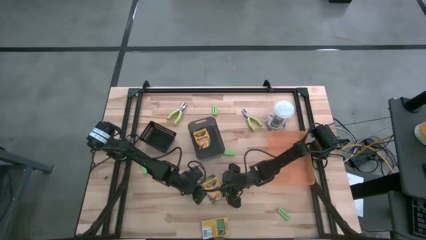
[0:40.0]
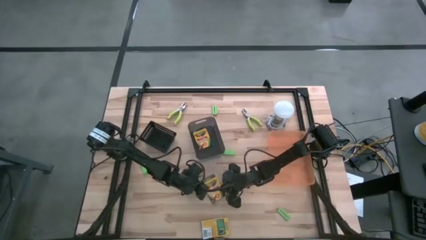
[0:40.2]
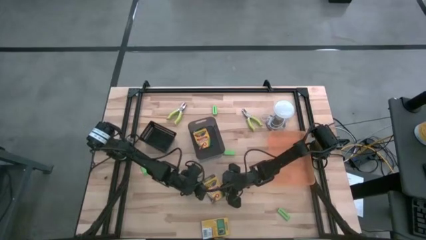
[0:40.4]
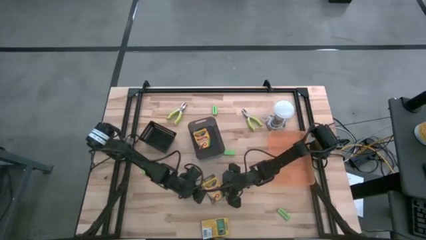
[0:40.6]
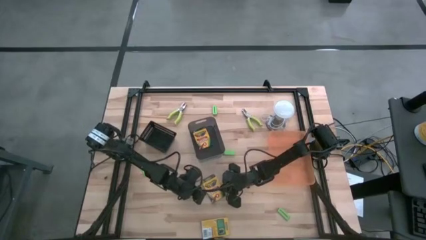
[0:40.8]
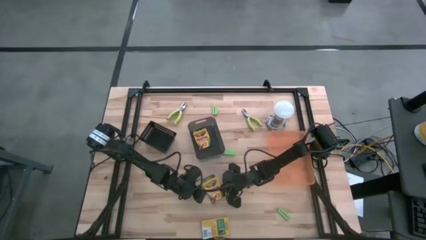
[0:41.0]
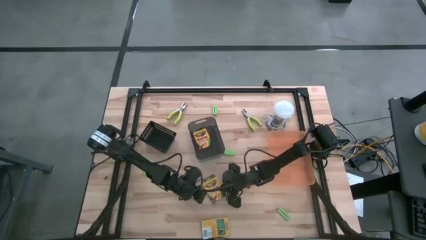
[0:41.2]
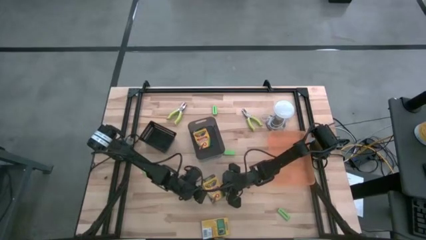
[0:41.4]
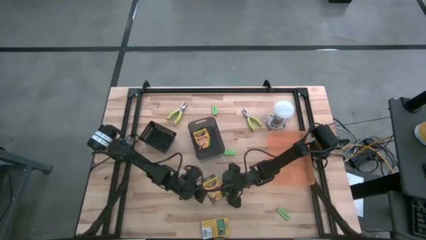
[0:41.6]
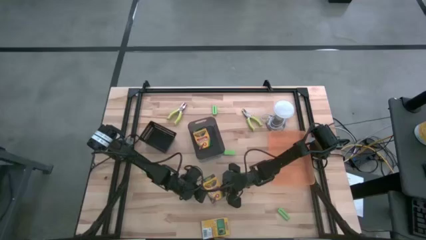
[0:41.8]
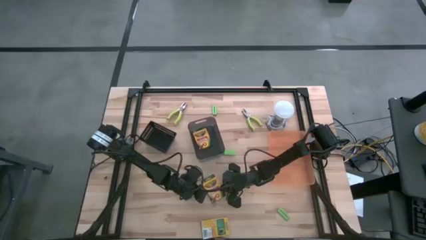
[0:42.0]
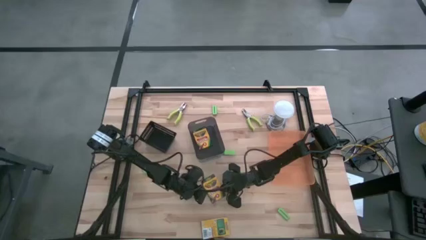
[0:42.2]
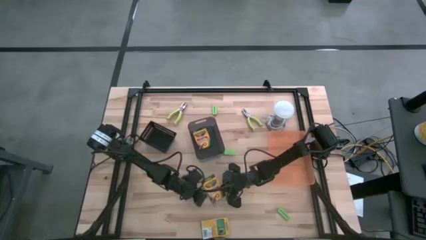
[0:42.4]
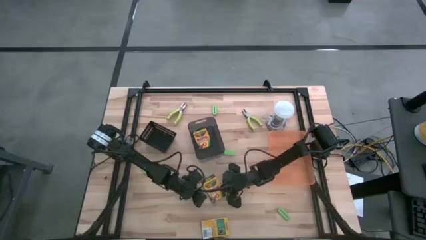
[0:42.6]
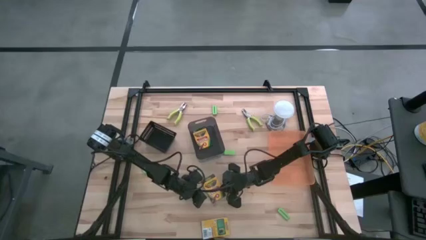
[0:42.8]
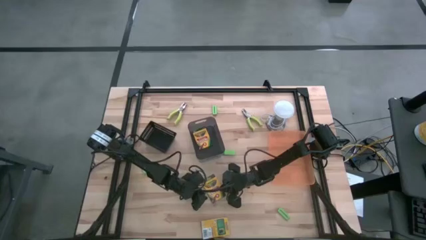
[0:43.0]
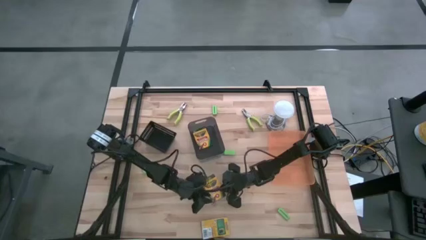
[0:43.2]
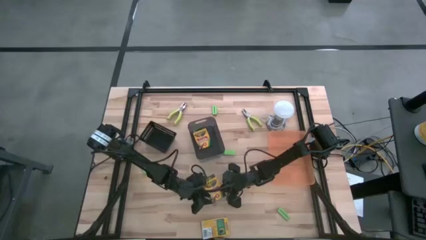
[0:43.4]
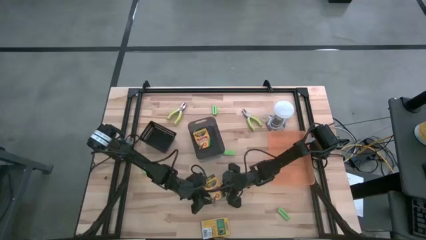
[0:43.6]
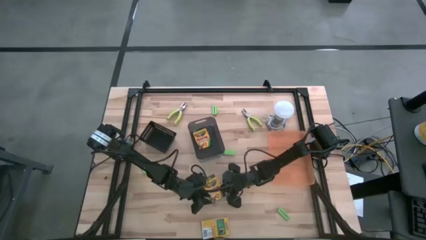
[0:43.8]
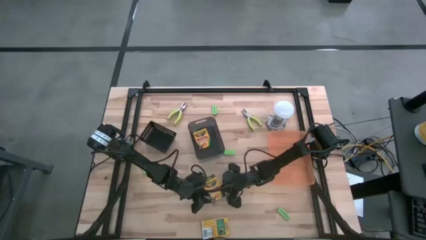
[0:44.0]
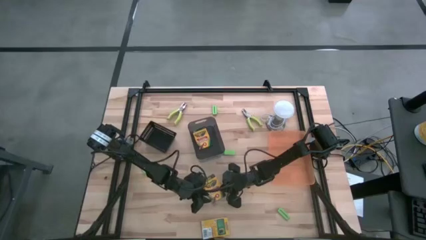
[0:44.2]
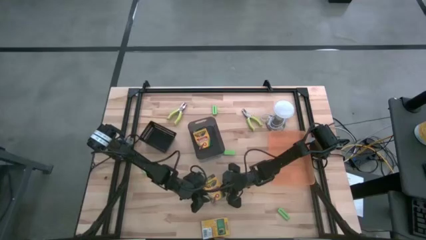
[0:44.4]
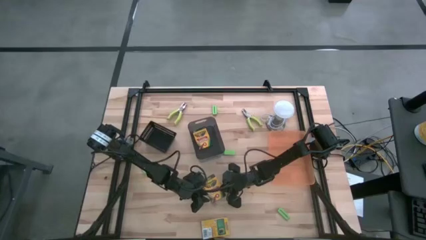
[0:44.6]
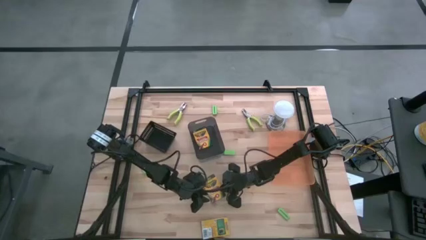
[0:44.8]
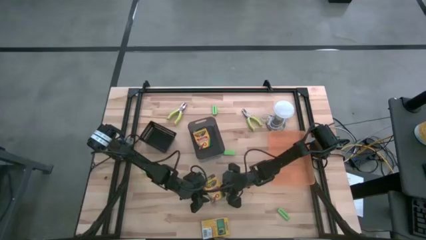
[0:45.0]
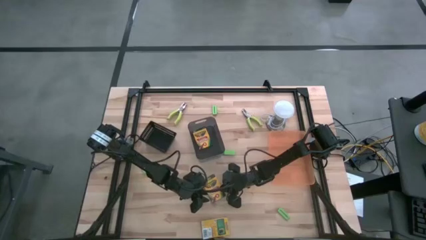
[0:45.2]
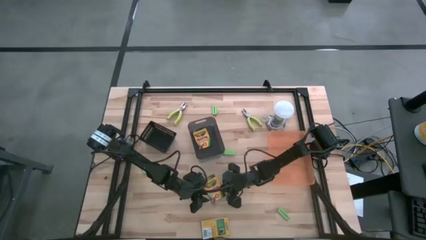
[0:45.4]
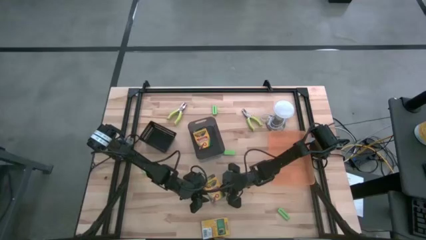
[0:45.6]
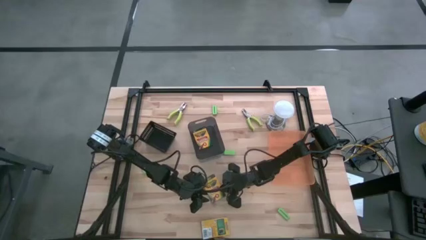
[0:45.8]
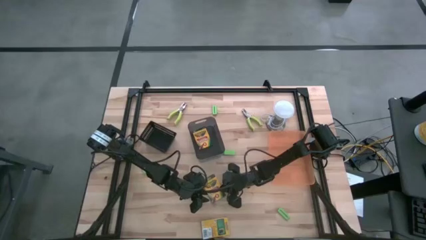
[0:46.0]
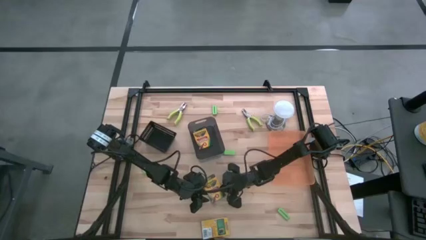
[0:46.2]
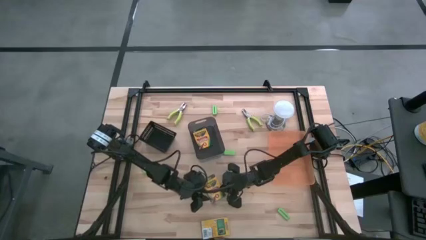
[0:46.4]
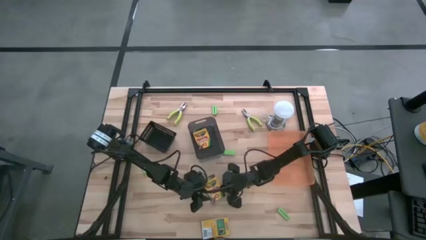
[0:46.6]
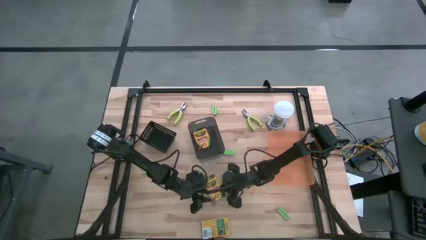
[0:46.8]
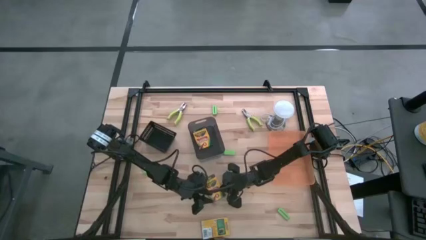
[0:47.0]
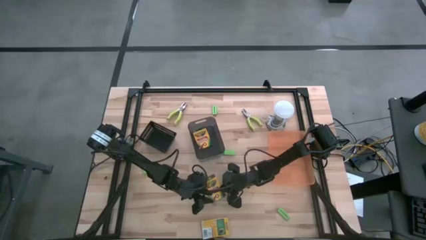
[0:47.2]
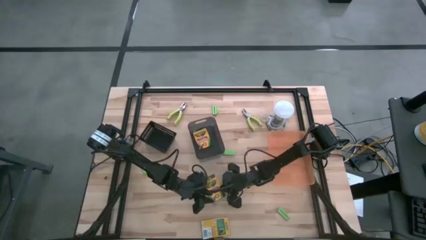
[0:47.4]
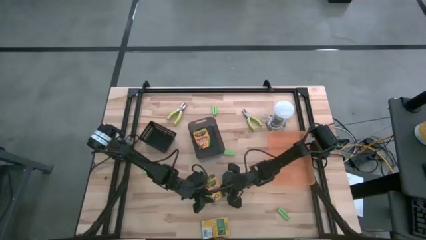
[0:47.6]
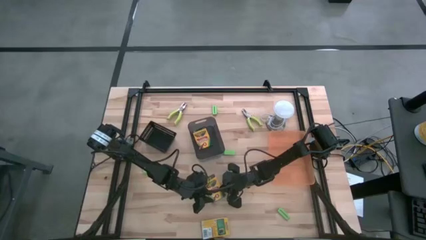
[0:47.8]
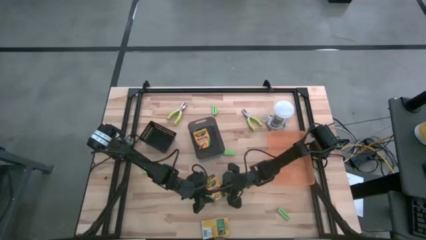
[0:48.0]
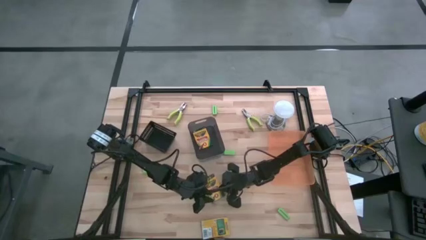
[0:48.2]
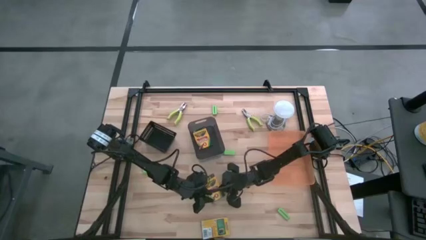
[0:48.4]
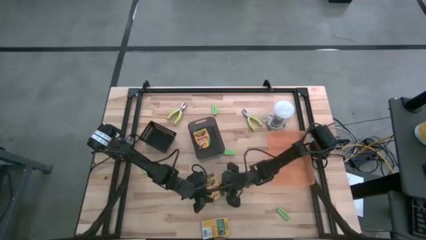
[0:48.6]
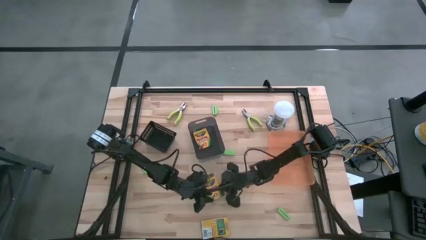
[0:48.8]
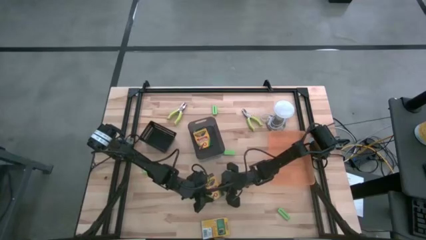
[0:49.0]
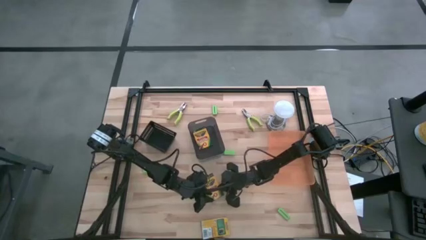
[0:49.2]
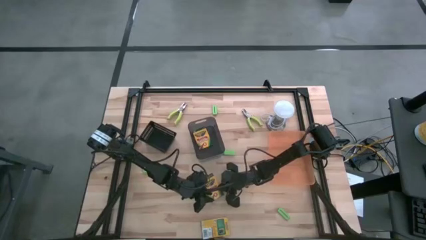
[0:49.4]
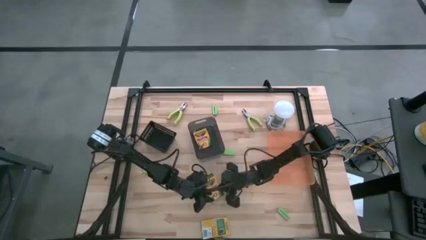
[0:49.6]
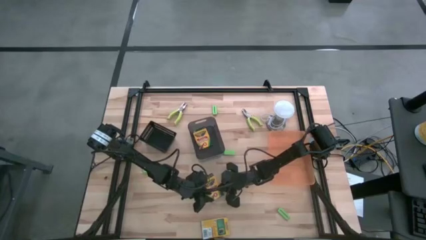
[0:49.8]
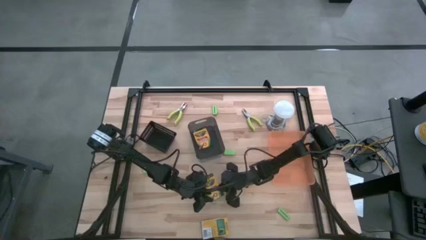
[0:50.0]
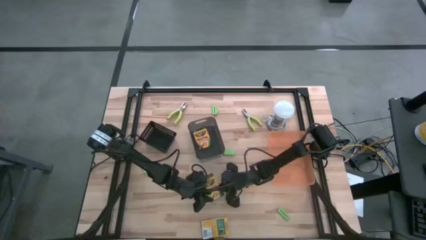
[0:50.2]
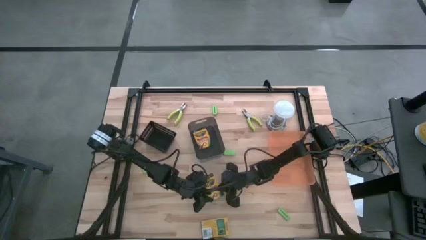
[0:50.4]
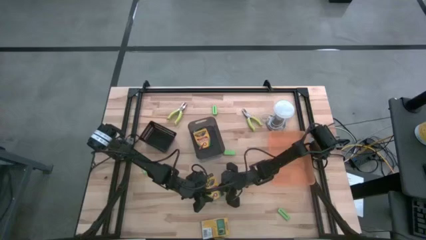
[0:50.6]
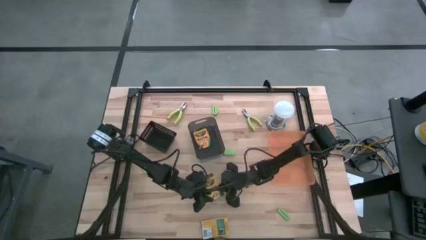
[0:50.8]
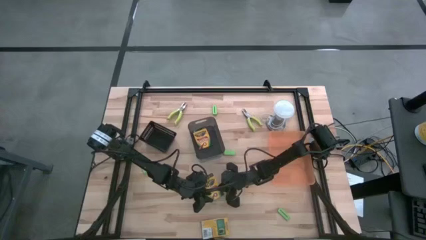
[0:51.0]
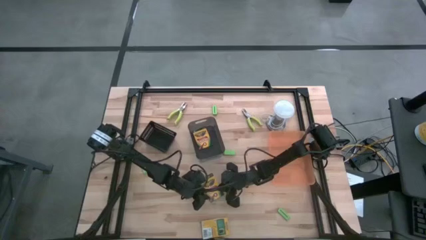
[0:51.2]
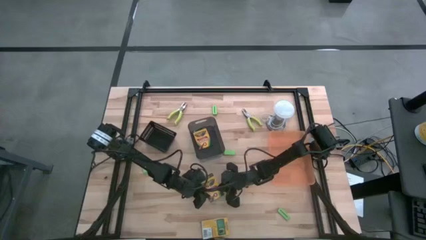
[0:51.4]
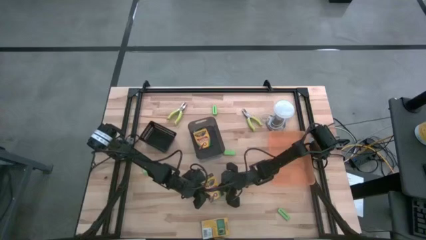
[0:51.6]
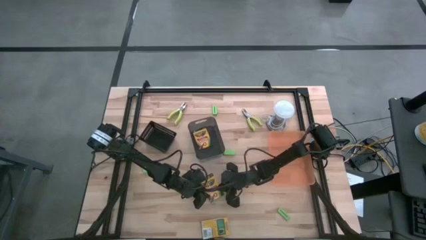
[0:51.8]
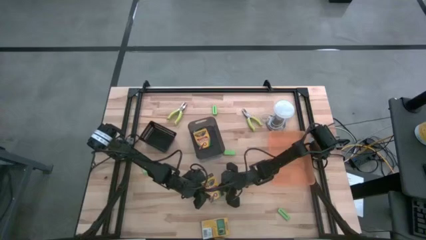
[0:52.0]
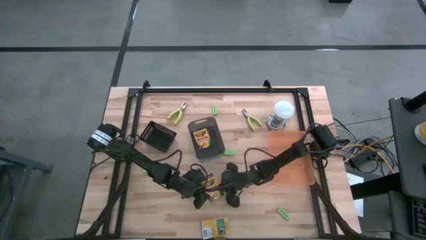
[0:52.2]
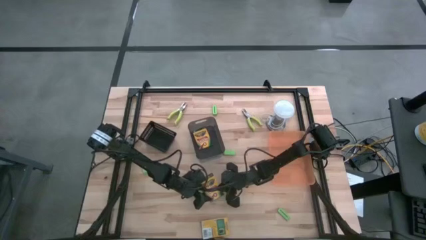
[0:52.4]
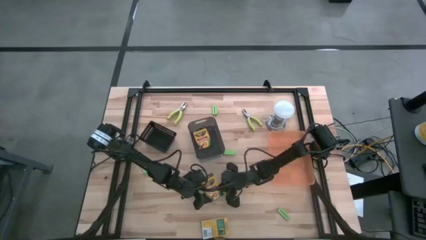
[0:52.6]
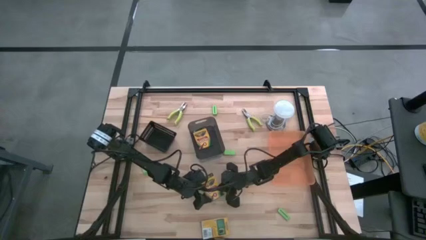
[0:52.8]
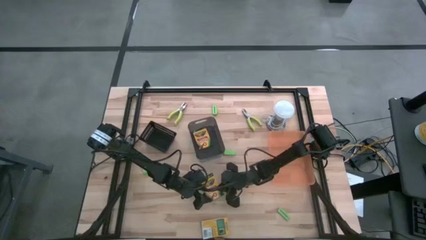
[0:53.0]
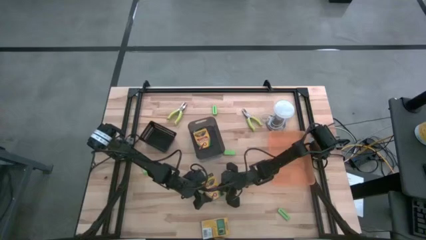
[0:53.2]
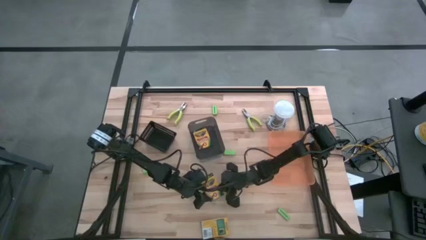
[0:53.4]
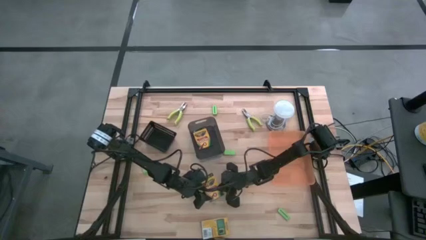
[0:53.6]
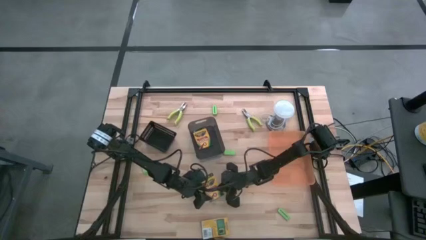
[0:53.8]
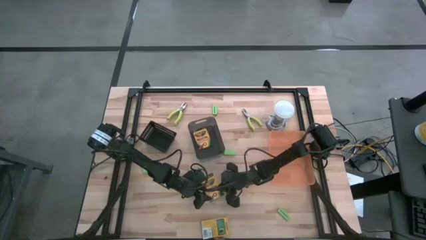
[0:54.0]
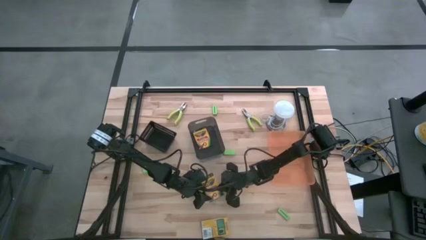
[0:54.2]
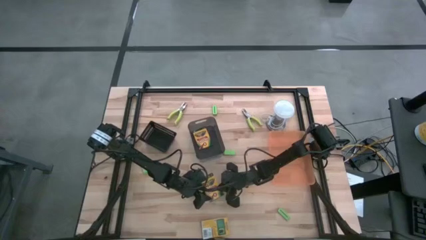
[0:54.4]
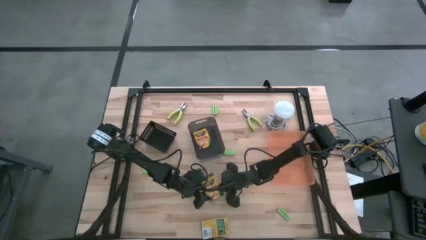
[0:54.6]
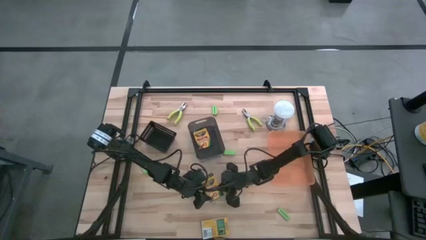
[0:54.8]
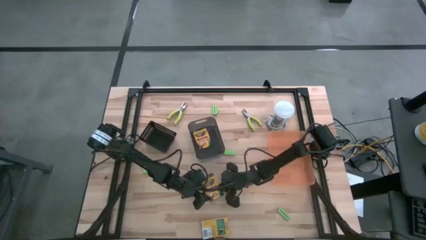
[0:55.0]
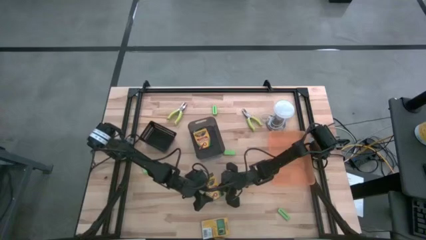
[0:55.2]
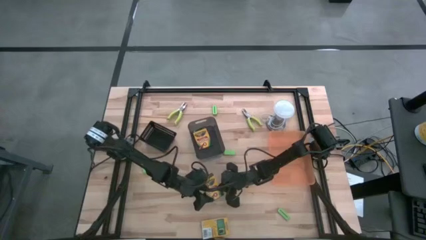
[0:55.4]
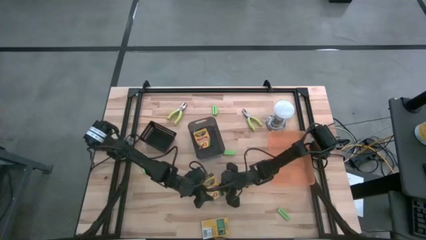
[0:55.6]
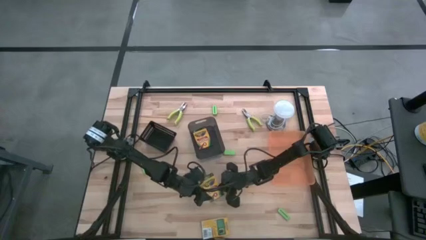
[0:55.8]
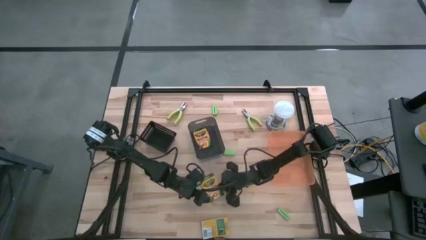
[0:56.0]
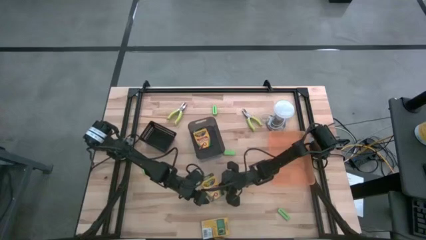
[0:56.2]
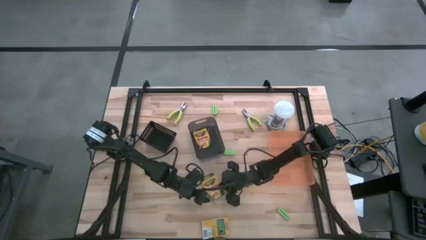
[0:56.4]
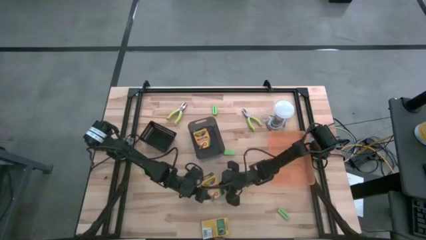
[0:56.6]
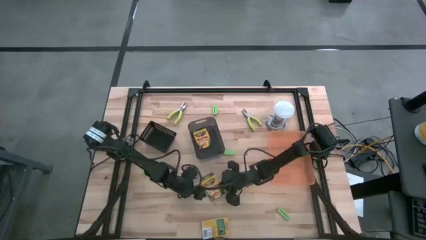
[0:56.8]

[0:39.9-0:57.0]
Task: Pick & Place School Supplies
Put the left yellow crayon box into the black transparent bin
